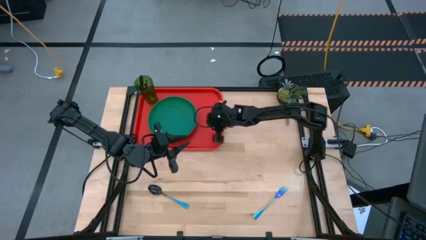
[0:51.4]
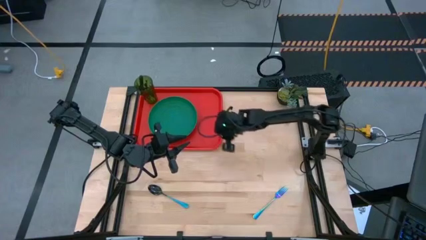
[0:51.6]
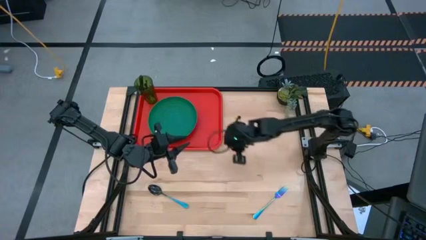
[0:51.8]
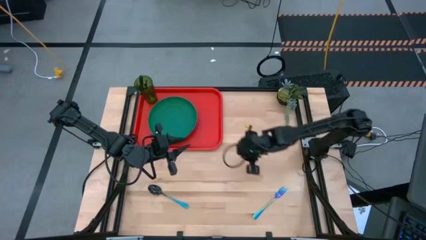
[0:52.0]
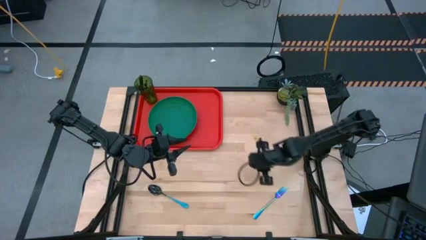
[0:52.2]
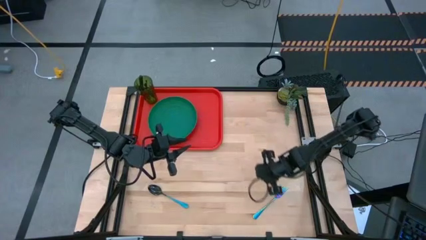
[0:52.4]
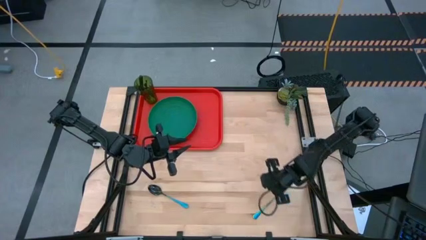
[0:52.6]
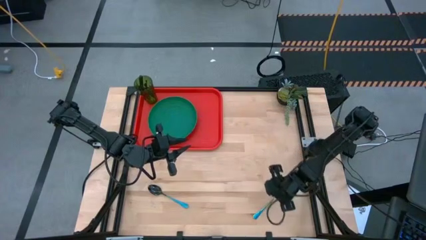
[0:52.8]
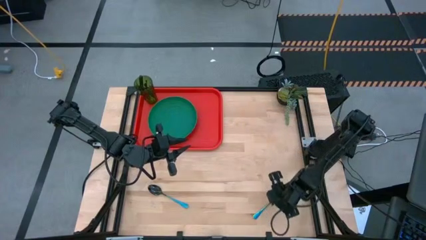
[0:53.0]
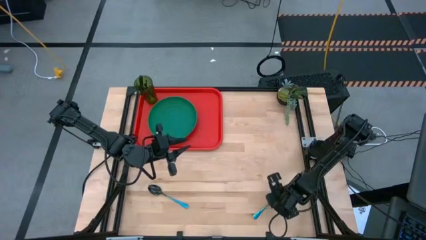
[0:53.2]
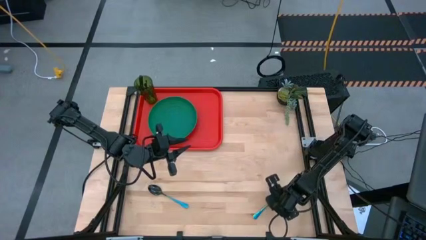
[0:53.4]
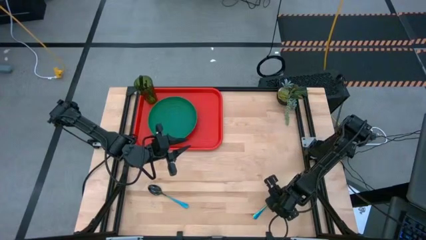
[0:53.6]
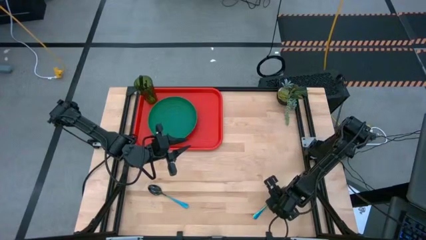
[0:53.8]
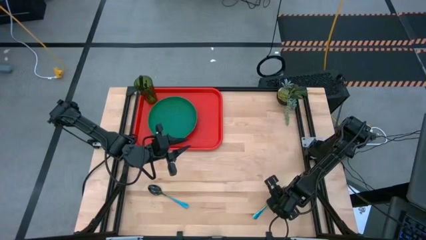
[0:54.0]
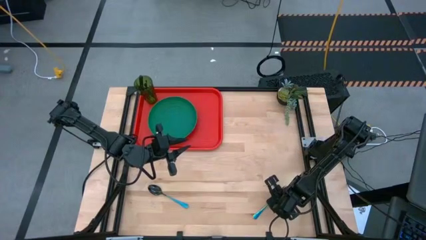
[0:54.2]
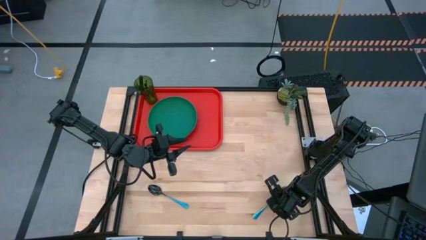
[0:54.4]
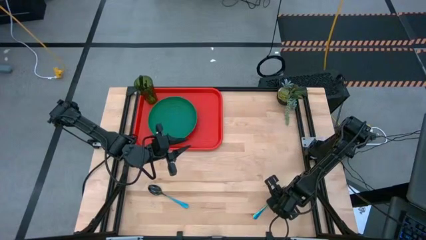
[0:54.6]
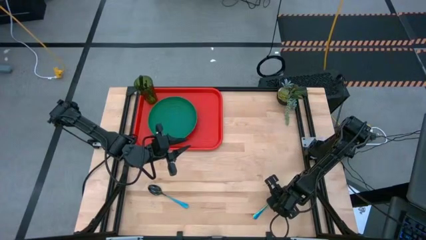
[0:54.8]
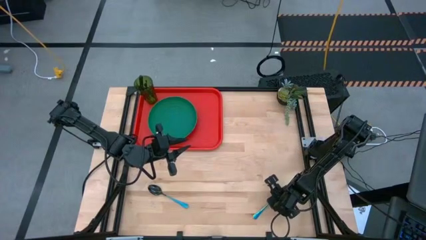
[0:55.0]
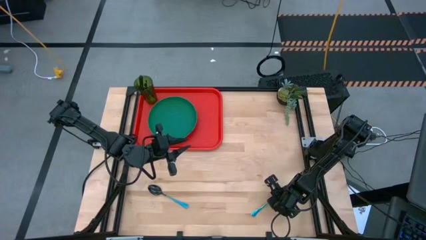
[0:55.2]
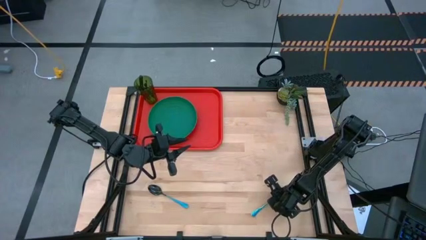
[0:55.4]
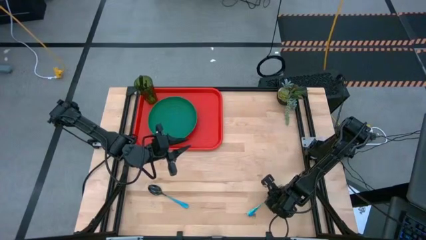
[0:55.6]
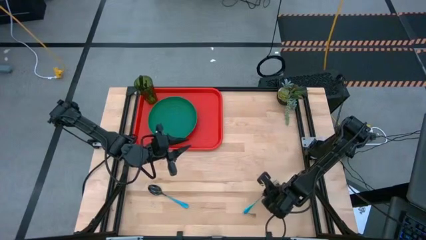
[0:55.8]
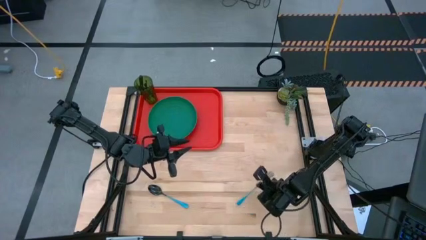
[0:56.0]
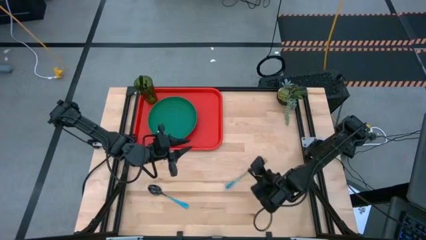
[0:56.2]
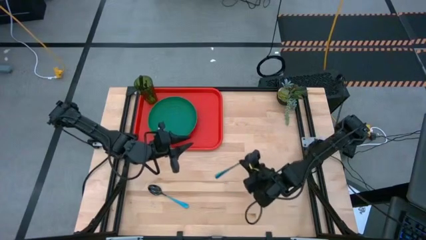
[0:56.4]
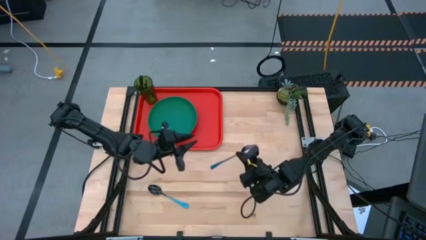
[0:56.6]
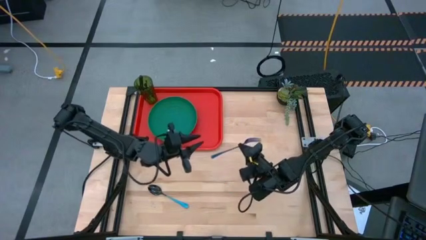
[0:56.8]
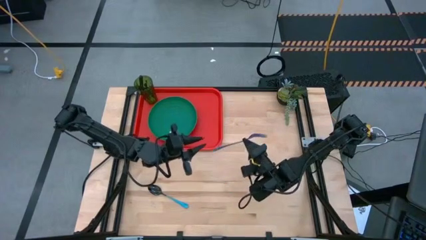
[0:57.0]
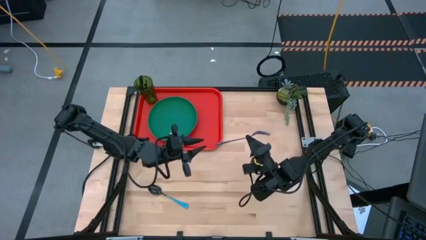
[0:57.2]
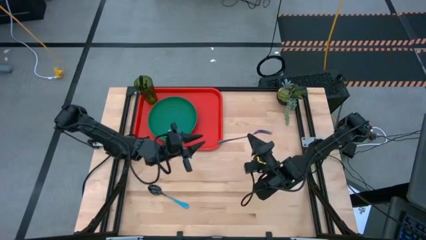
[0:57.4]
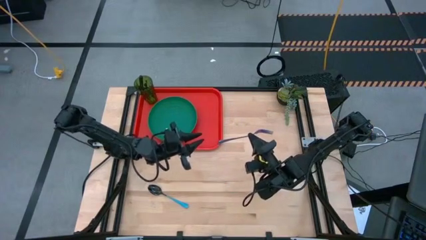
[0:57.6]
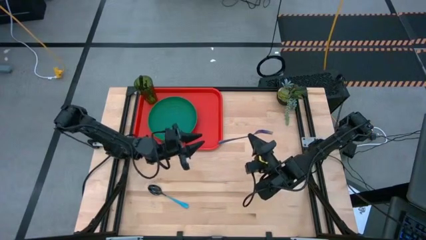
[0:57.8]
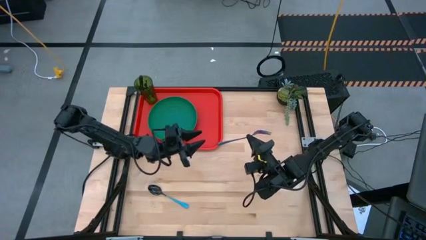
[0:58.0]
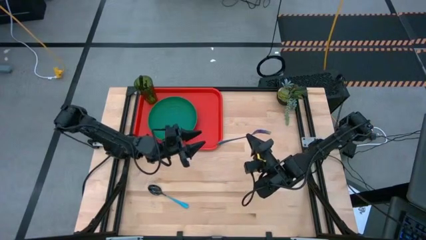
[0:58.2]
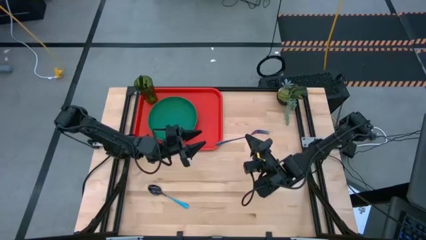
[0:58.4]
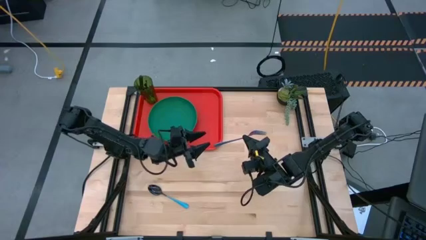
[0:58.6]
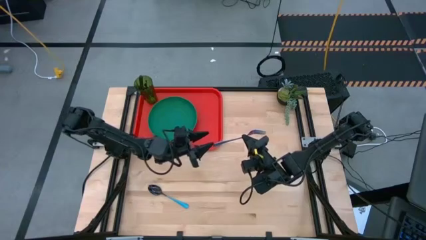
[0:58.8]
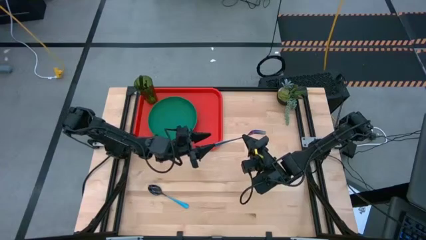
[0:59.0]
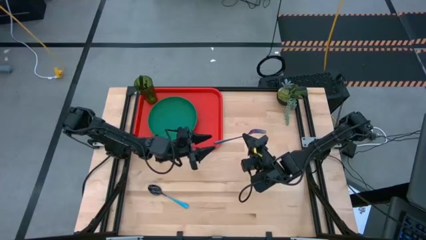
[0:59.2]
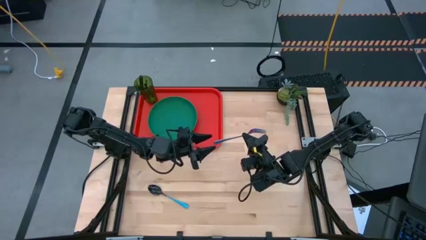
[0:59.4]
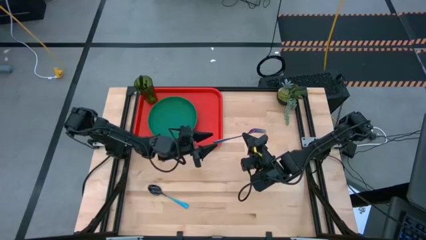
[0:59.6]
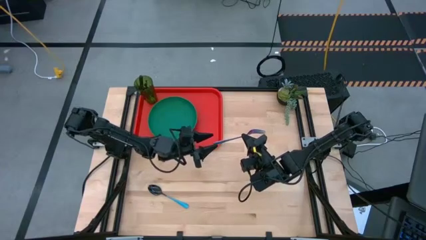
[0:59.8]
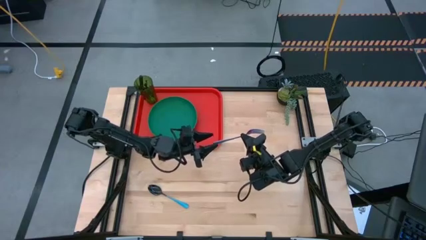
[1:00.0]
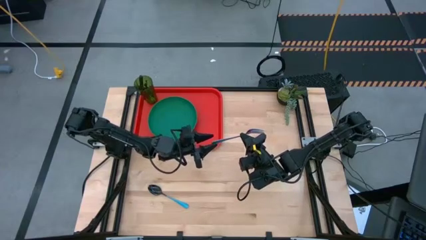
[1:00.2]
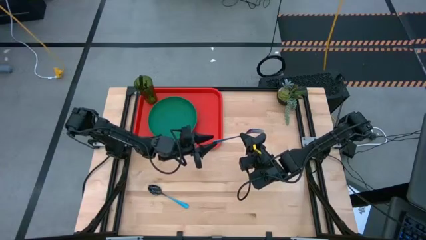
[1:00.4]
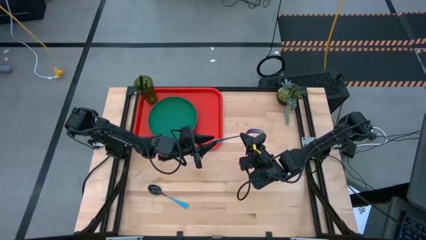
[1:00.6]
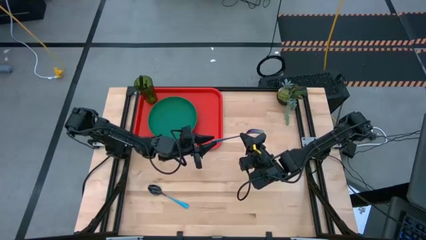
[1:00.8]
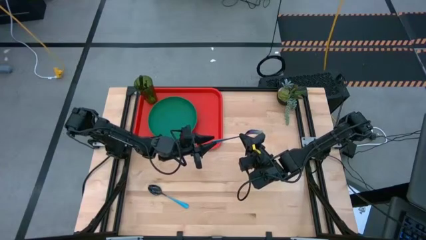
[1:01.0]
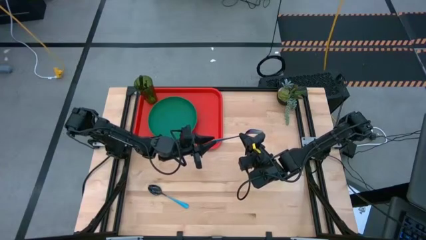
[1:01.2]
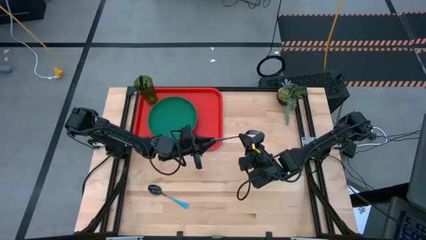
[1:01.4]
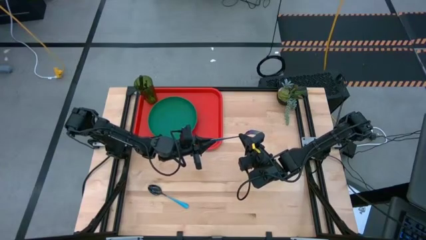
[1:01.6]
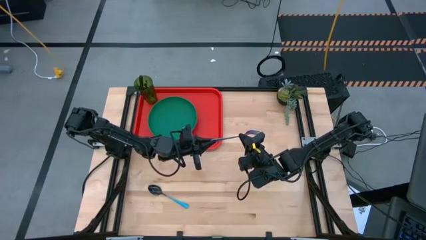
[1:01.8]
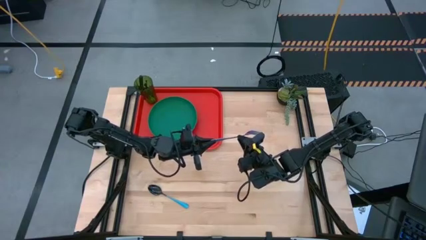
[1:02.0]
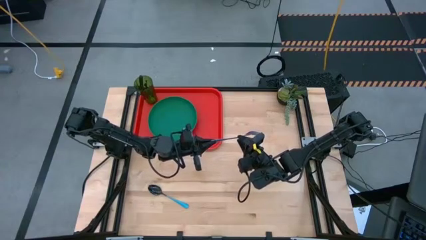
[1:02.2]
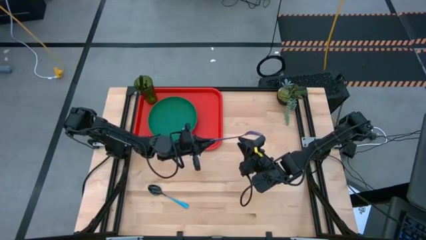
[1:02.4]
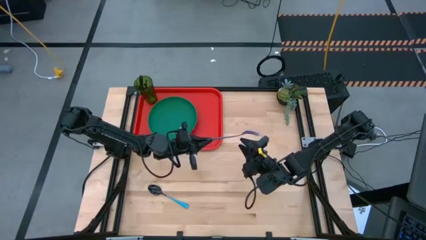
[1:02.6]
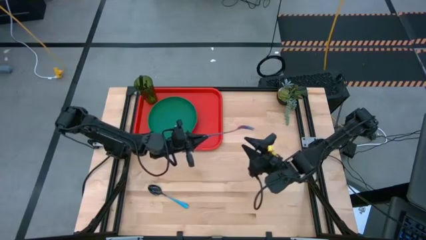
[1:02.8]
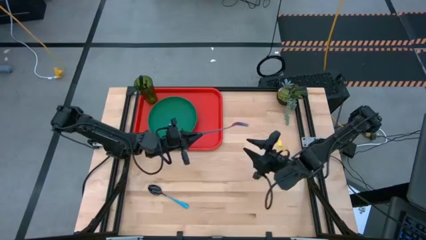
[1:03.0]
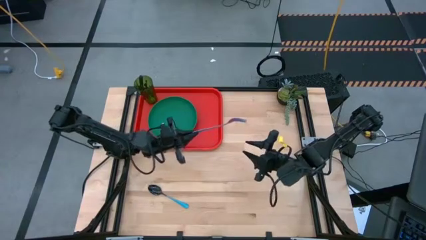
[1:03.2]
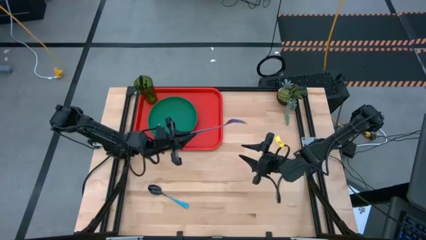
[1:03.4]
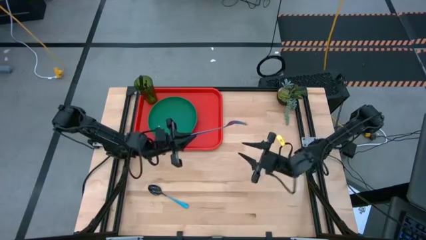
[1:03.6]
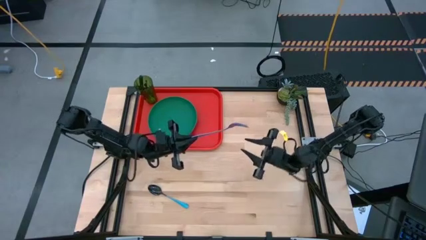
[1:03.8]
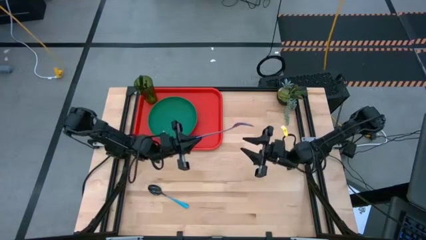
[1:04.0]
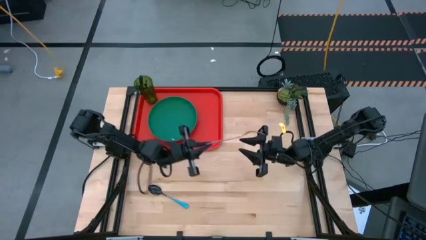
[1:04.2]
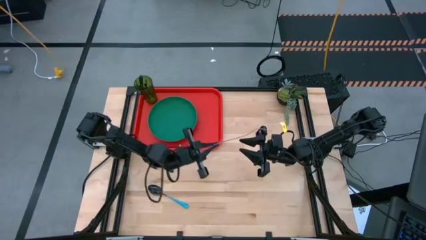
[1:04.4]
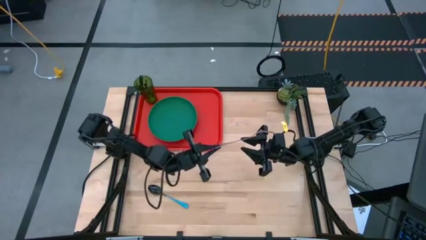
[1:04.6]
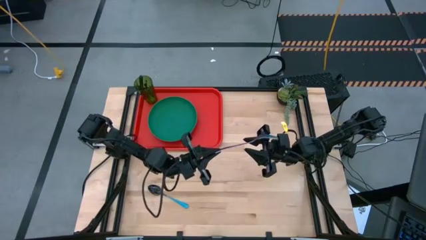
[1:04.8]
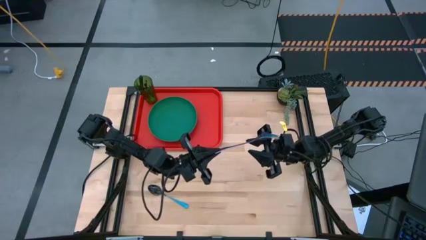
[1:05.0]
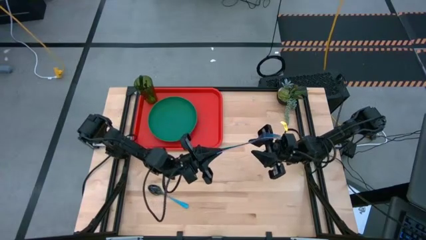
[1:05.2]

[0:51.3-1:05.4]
Task: Pick and place plate/cup/fork/spoon on tray
Put the blue fork on the orange tray to the right side of the green plate
